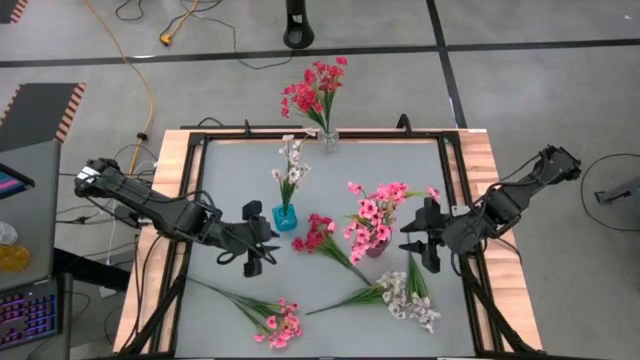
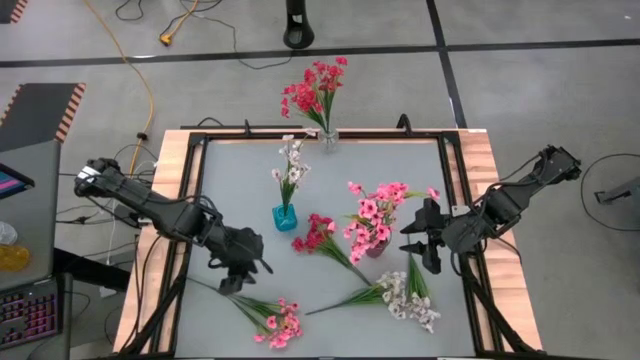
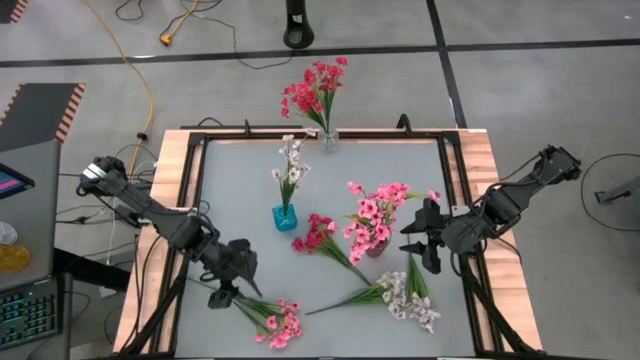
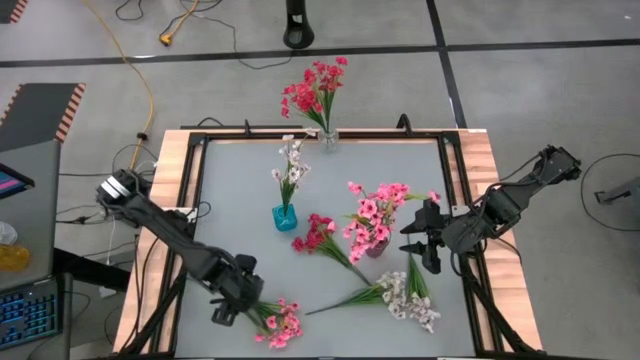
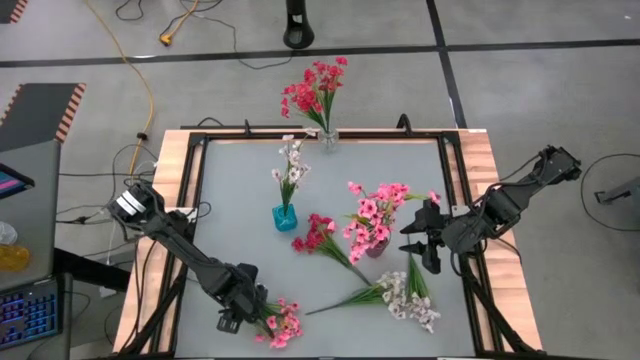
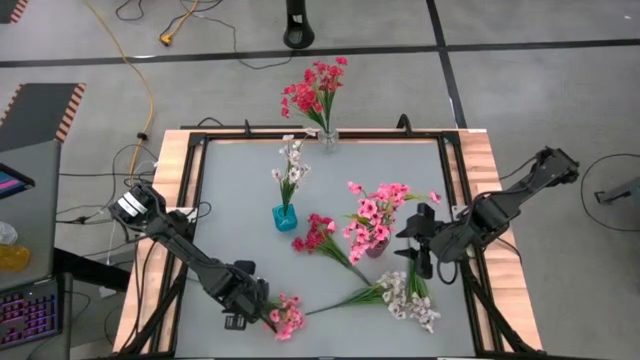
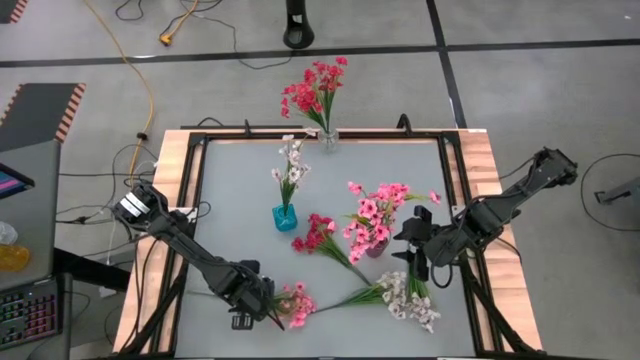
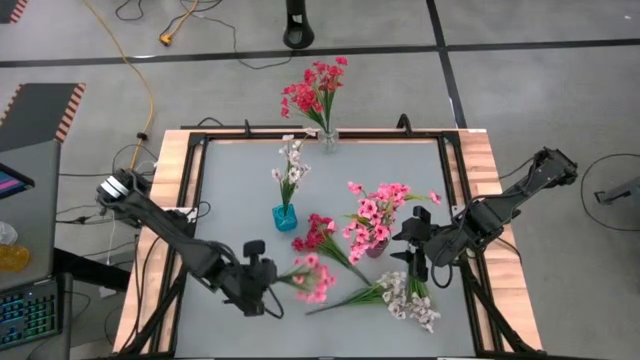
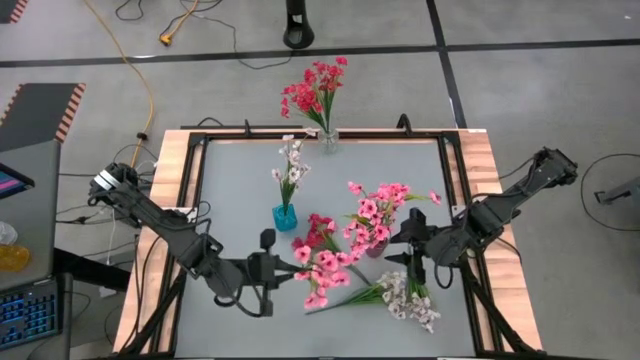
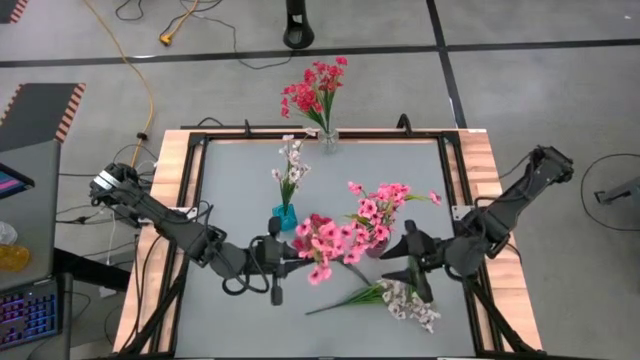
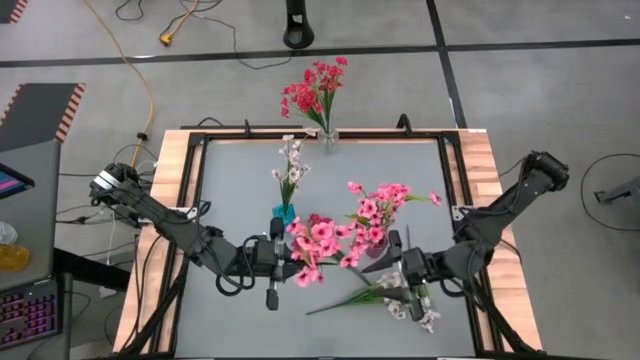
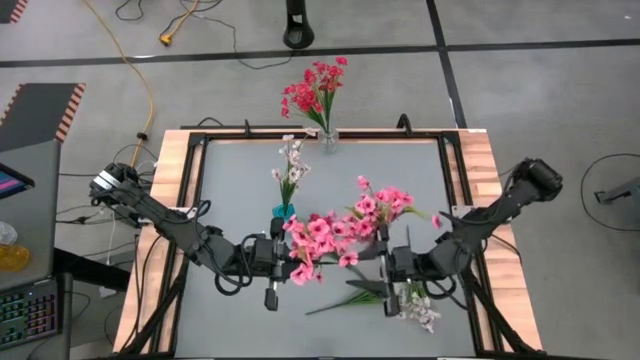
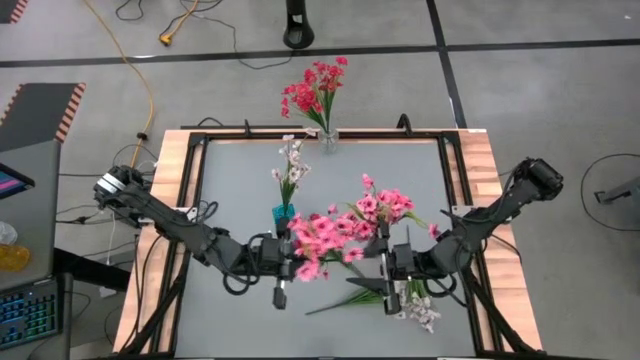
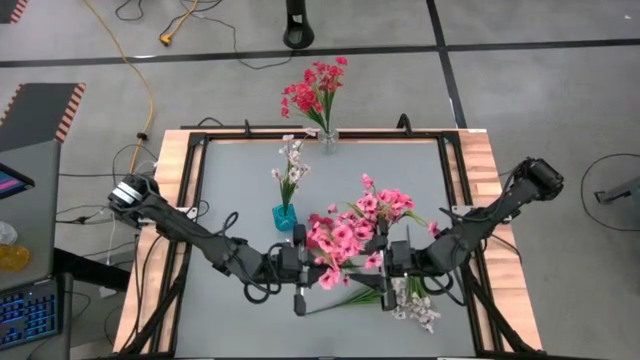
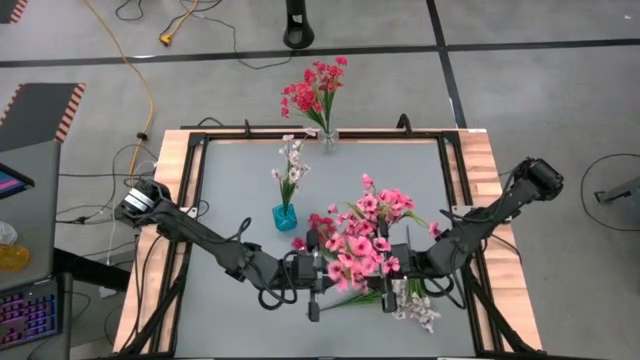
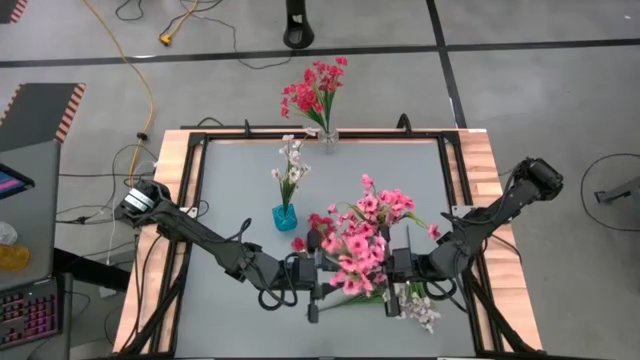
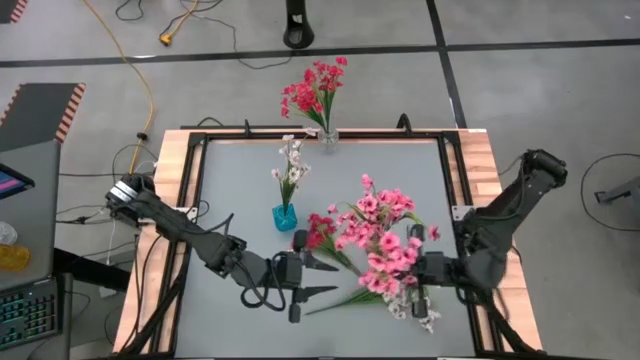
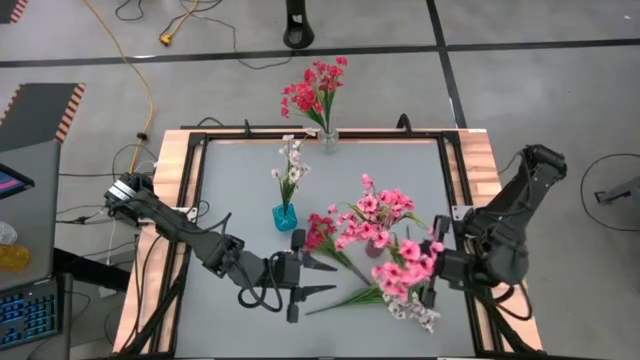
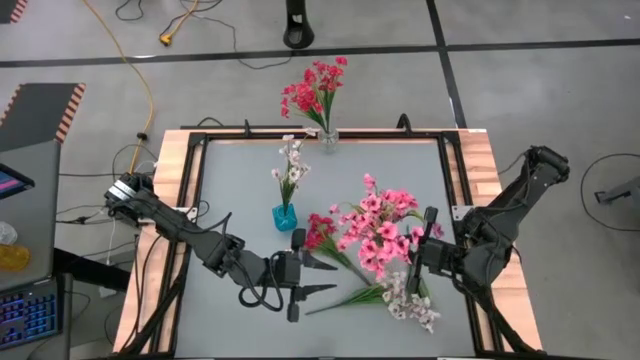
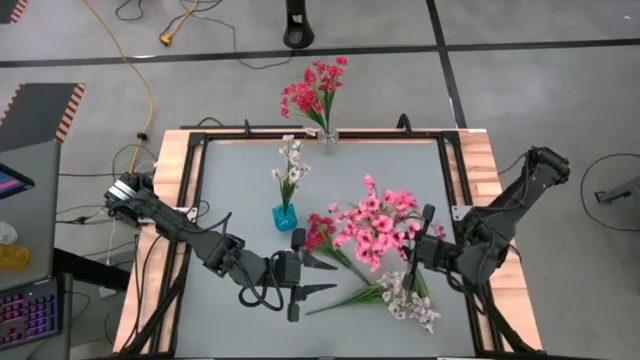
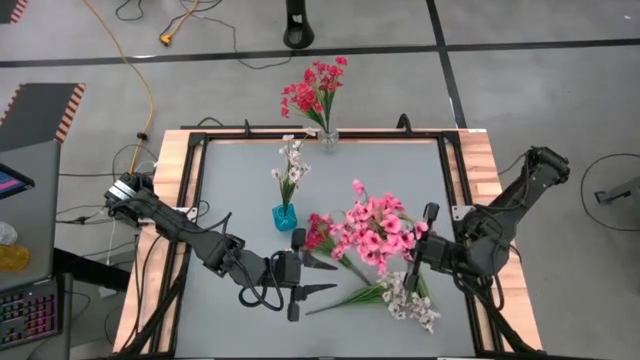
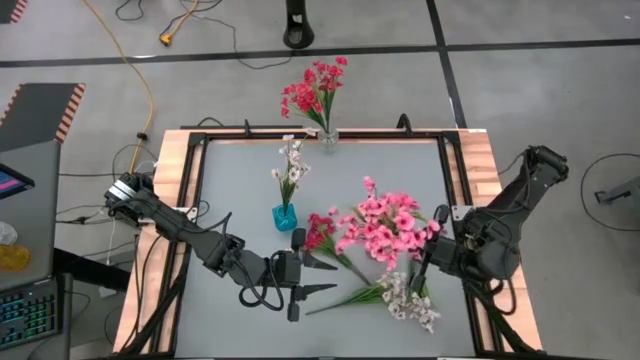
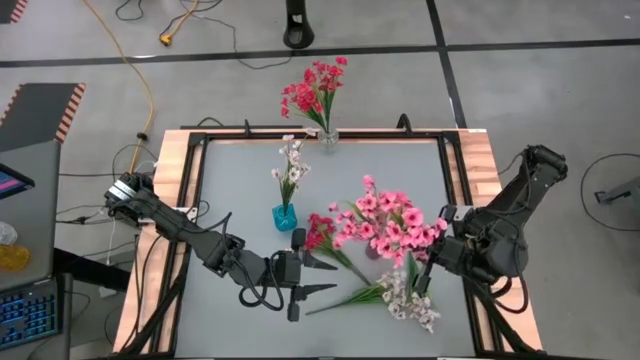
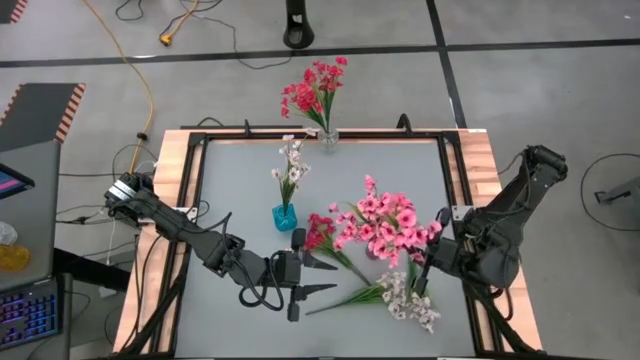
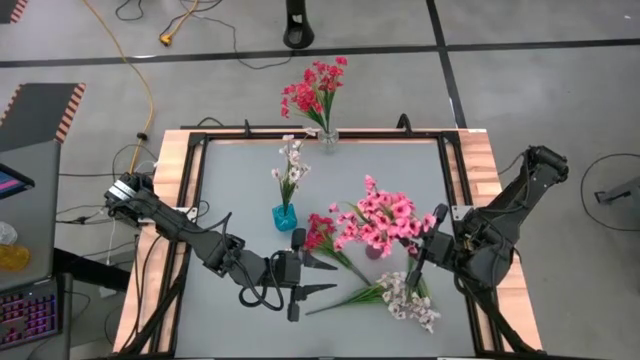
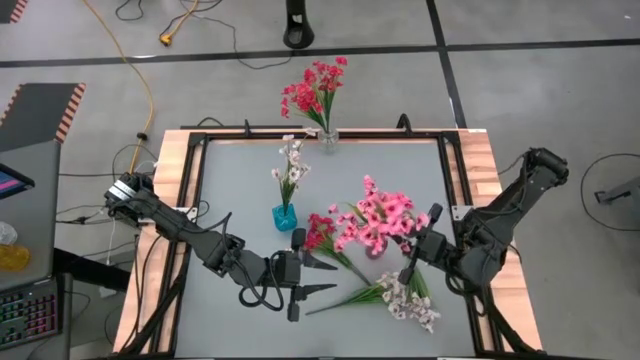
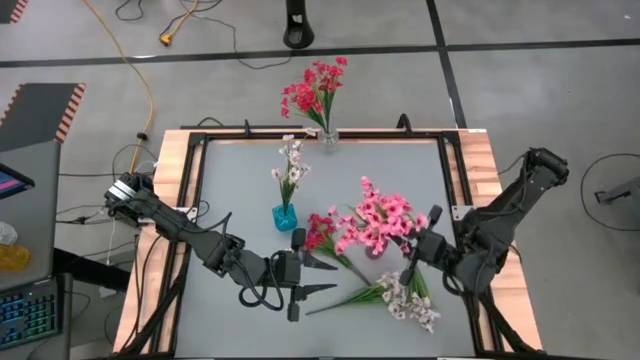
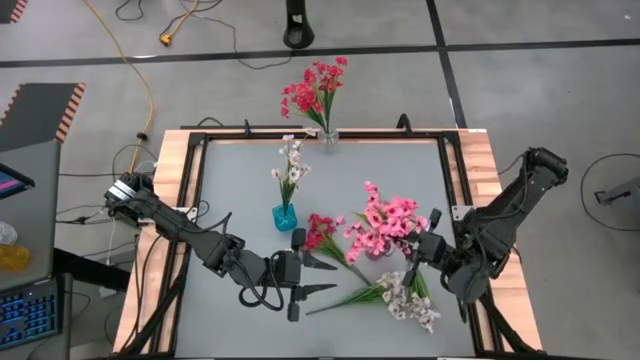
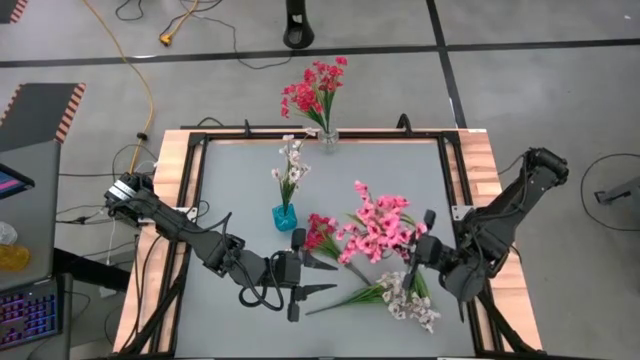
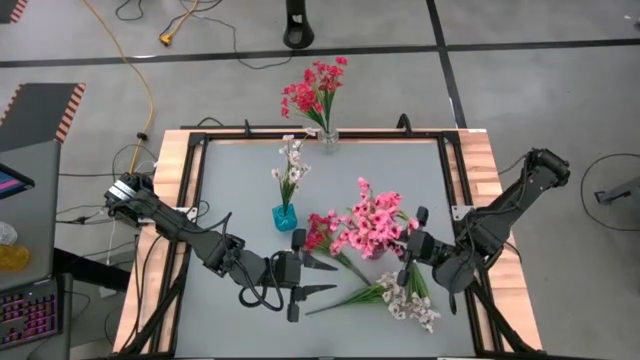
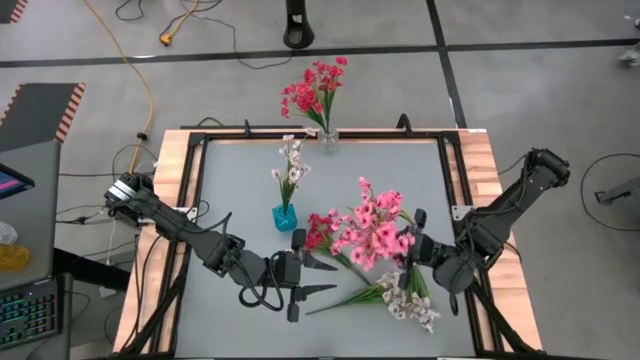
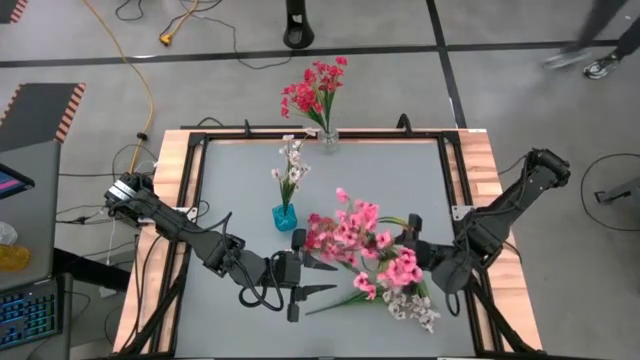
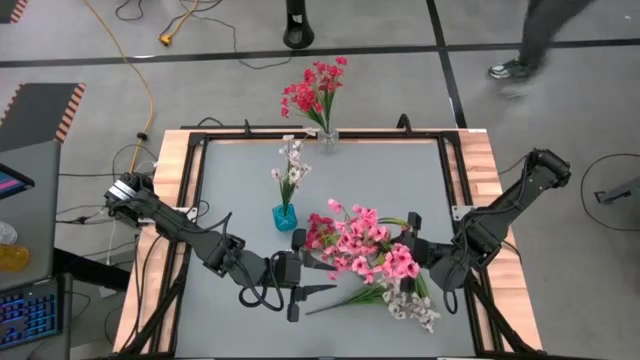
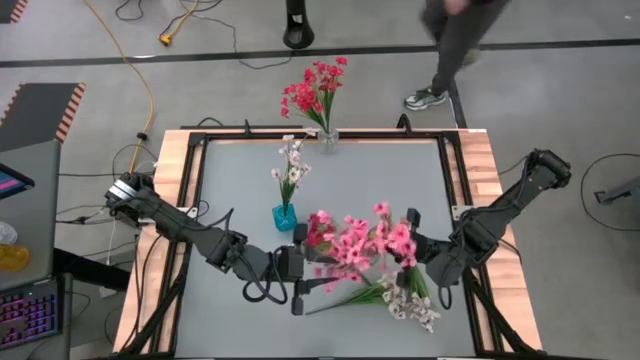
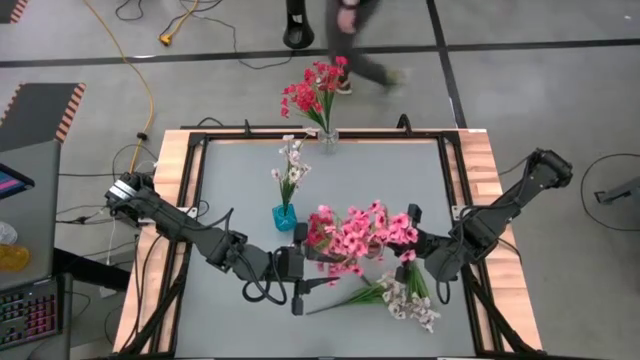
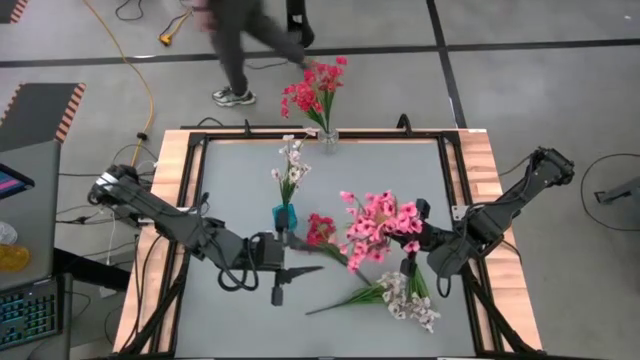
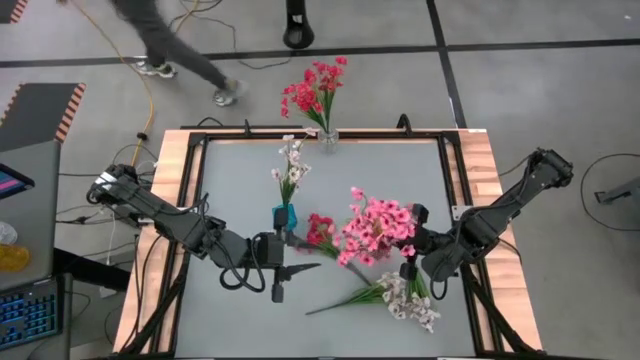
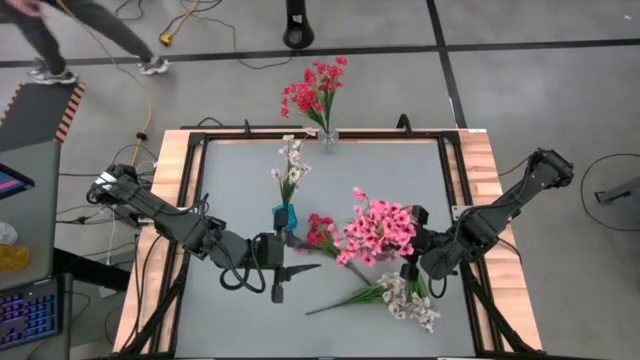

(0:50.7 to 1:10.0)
Task: Sort flowers into vase by color
Put the pink flower into the red vase

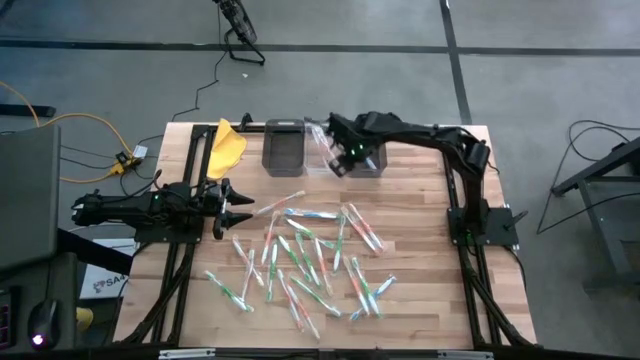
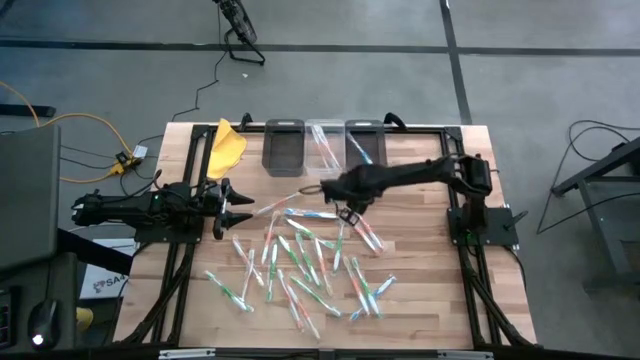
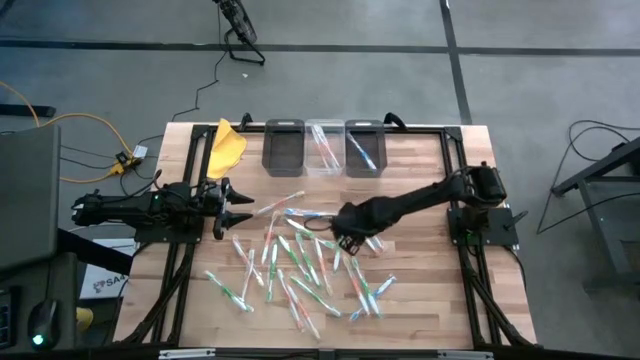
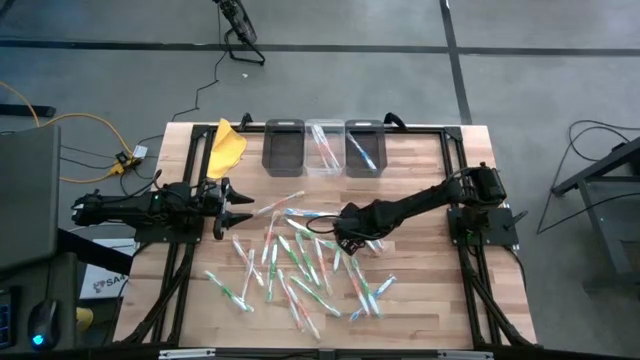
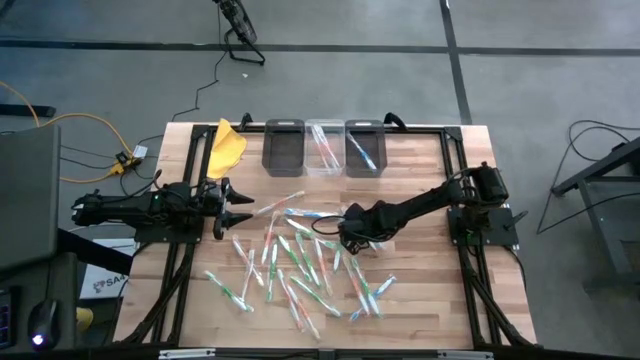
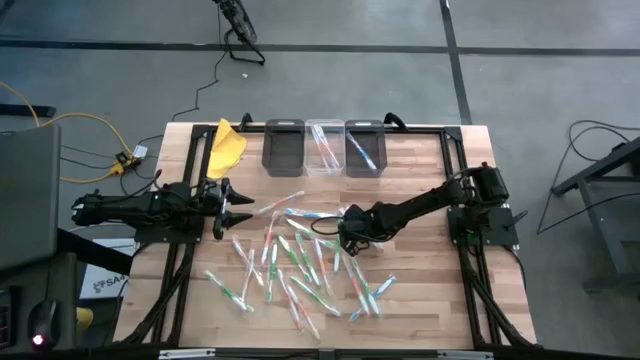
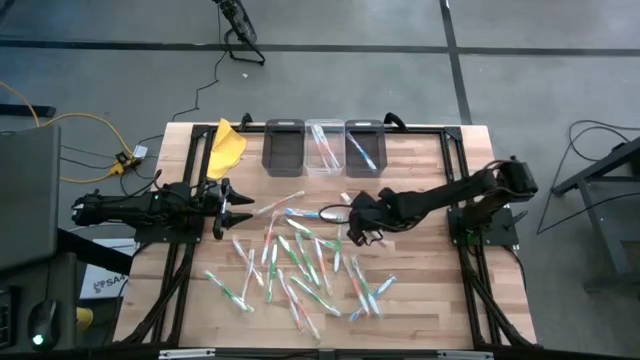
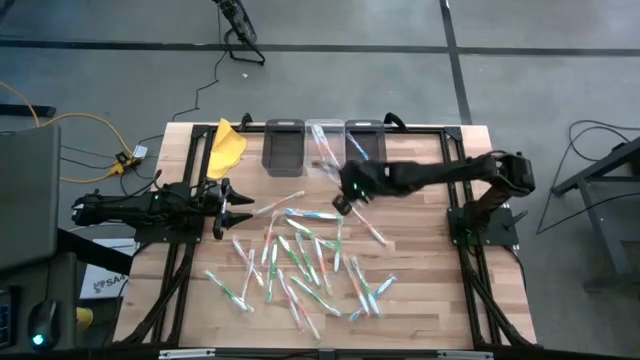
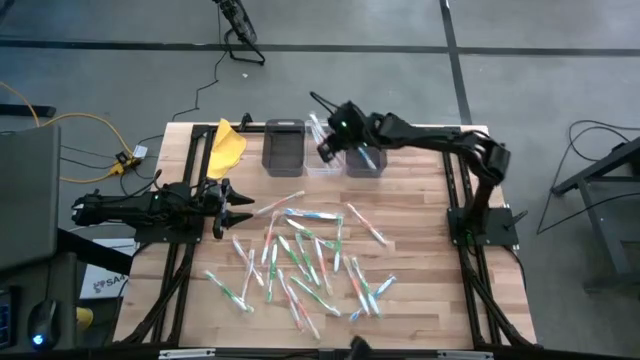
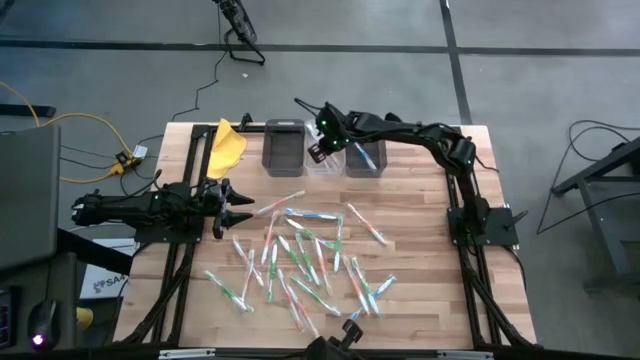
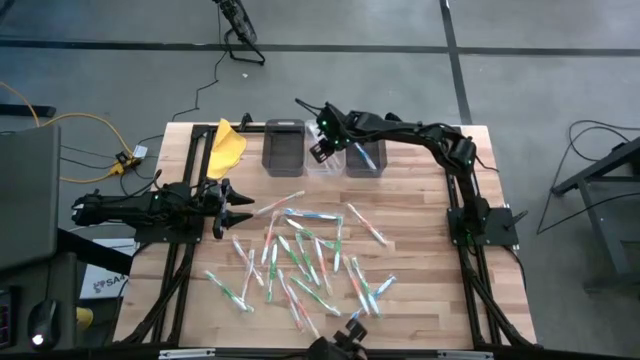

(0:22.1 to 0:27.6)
Task: Pick & Place Toothbrushes
Put the orange toothbrush into the transparent bin
